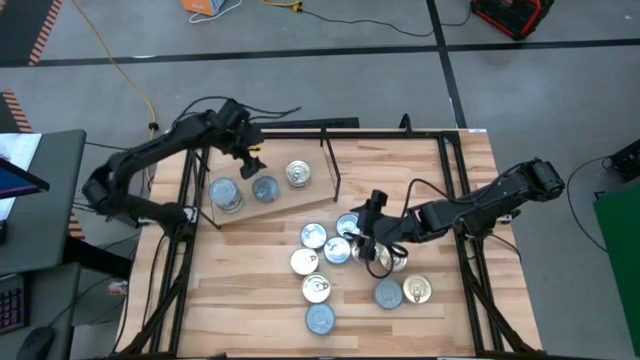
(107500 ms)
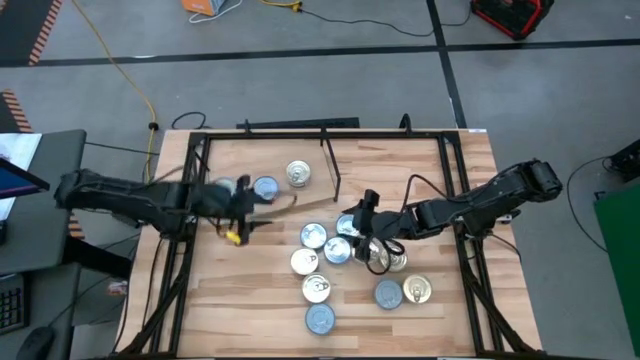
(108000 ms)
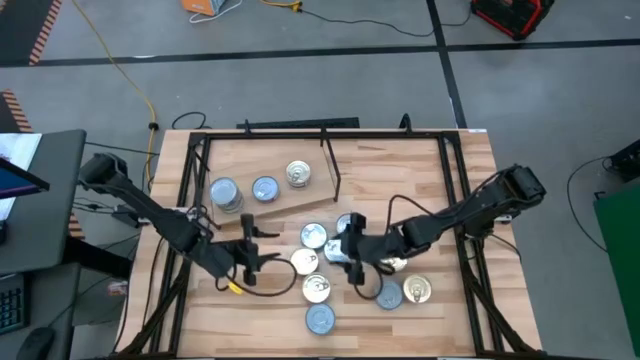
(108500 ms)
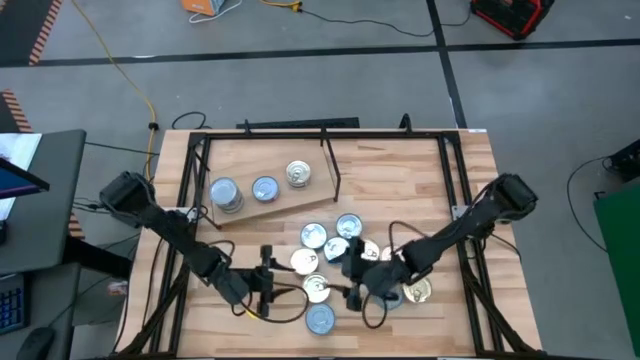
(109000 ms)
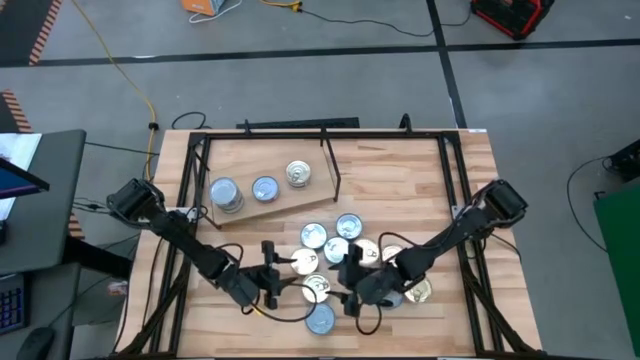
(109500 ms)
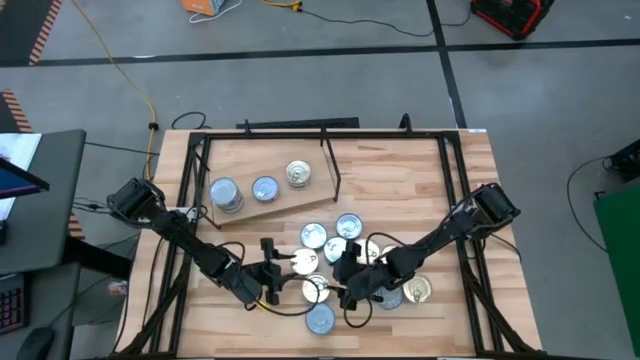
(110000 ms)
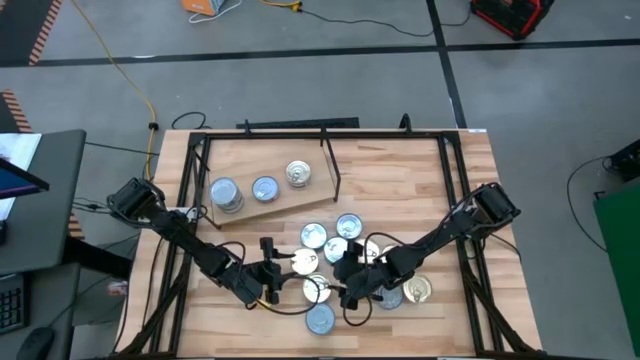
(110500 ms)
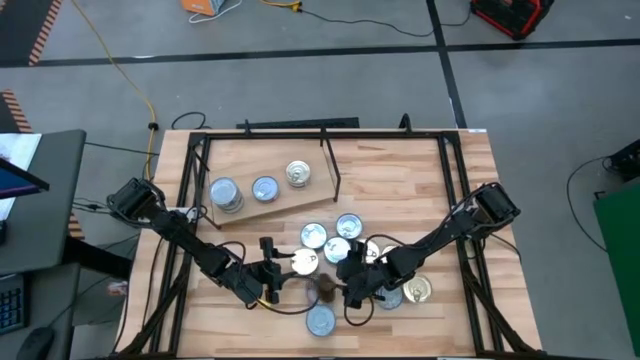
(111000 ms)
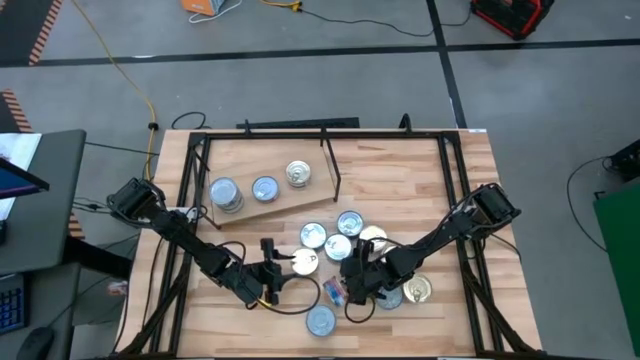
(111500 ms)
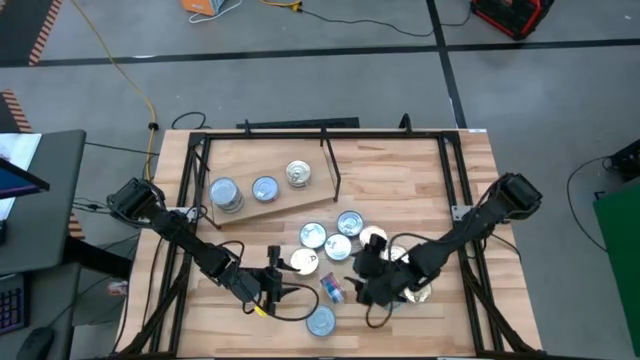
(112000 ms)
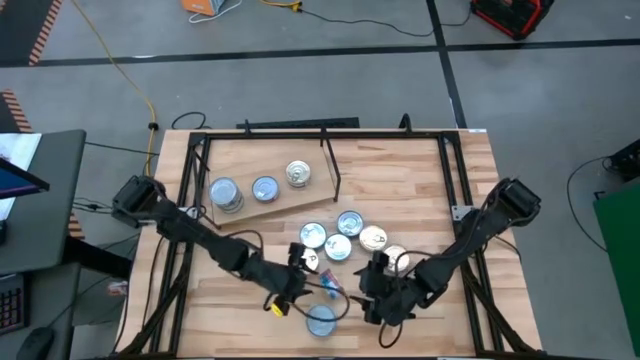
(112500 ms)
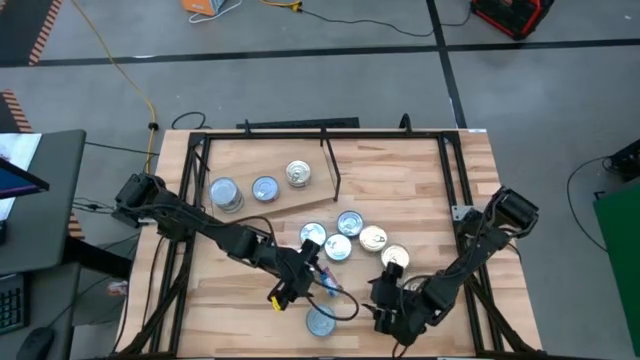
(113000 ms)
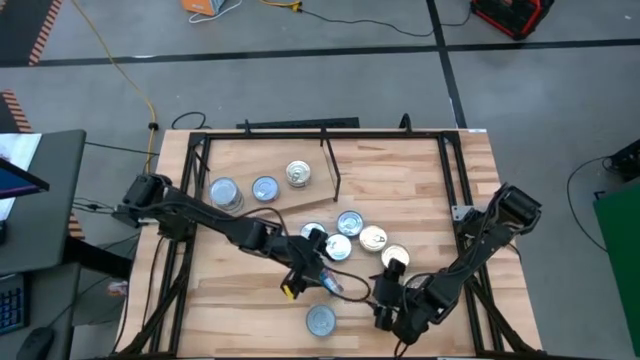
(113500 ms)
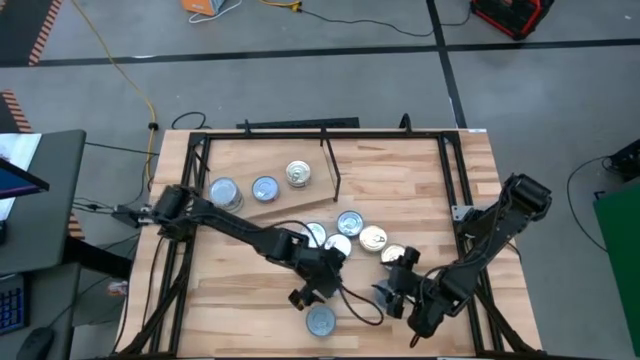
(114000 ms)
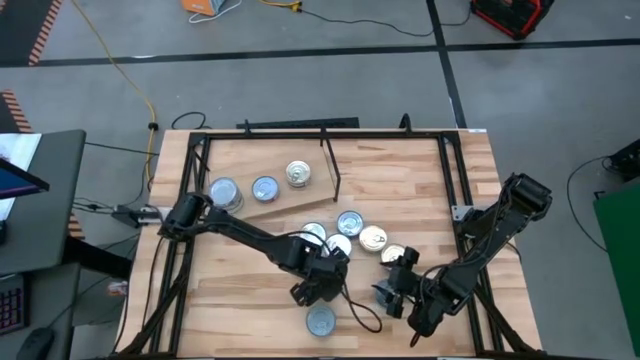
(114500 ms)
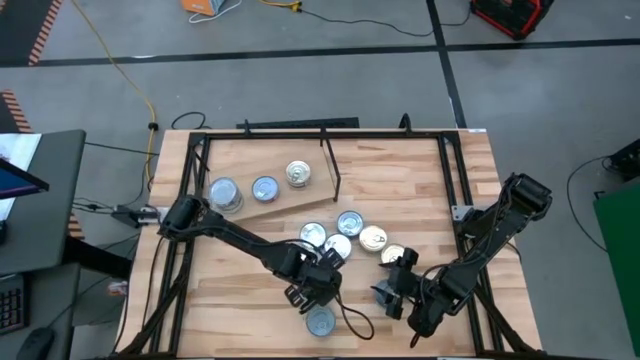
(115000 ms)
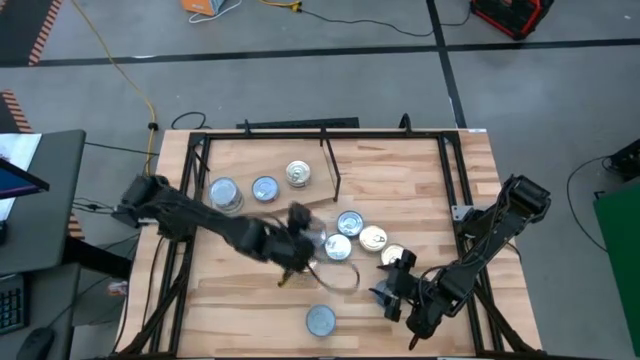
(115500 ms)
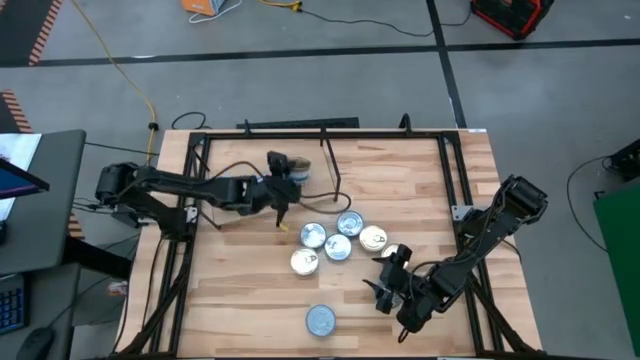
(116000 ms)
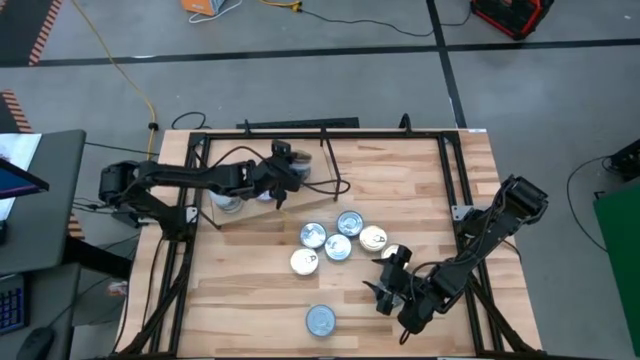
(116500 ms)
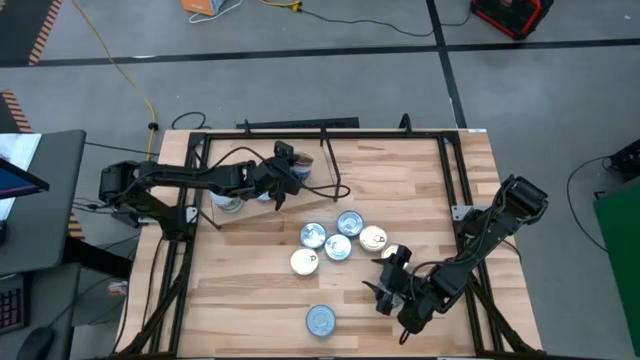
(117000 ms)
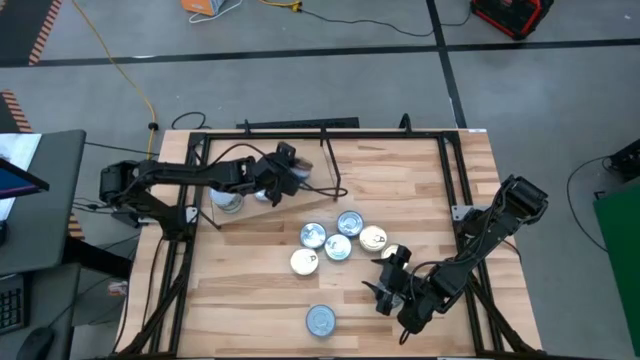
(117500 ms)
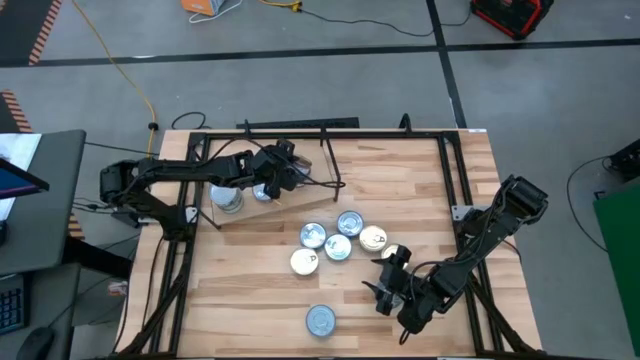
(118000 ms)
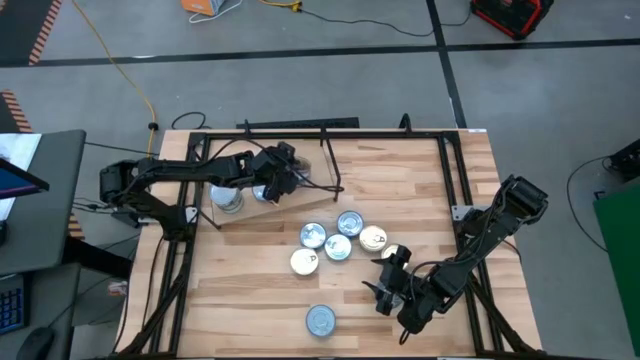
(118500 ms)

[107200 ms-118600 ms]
Task: Stack canned seafood by type on shelf
Stack the blue pink tuna can on top of the blue pink tuna can on the shelf

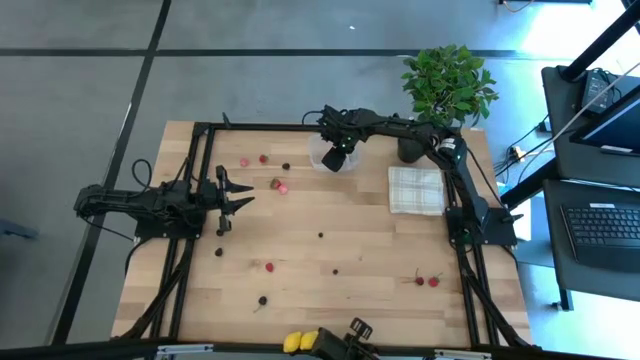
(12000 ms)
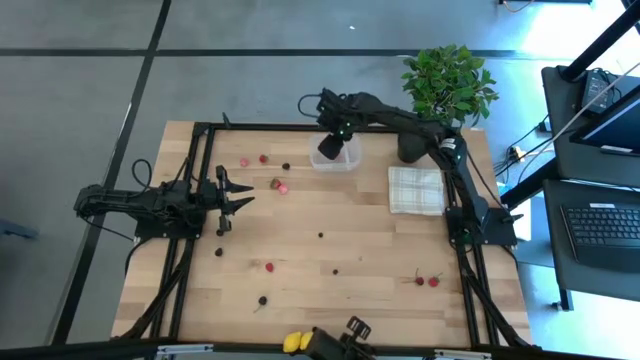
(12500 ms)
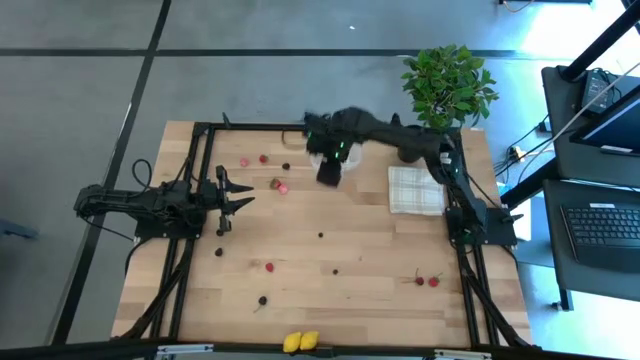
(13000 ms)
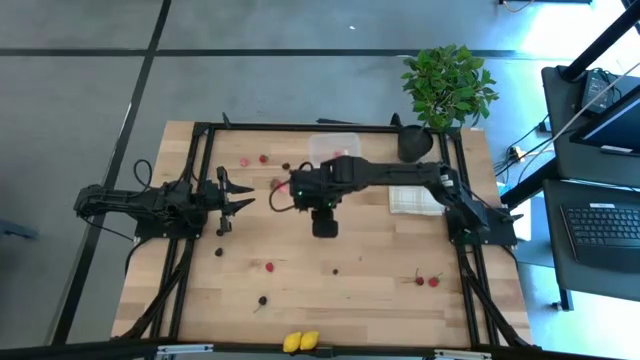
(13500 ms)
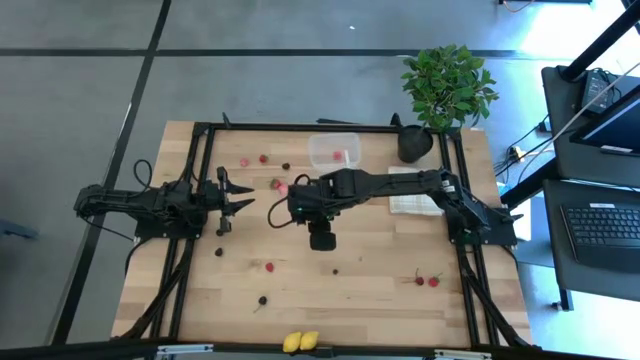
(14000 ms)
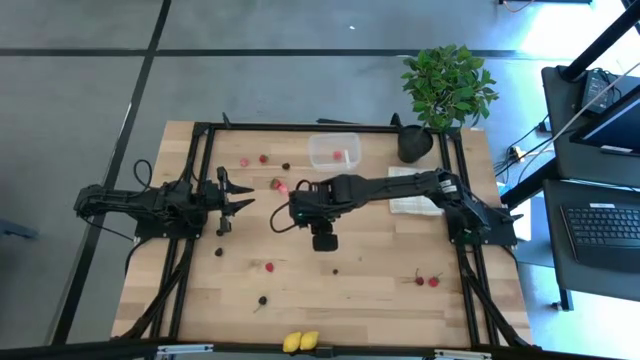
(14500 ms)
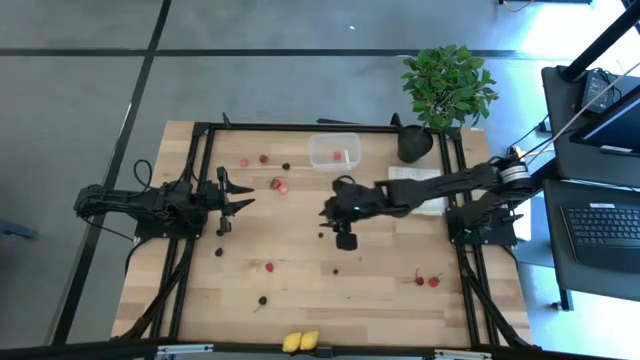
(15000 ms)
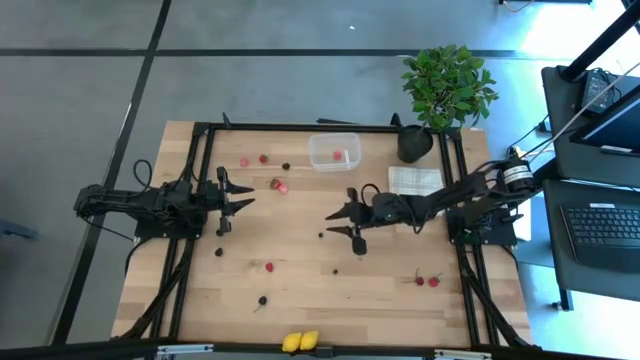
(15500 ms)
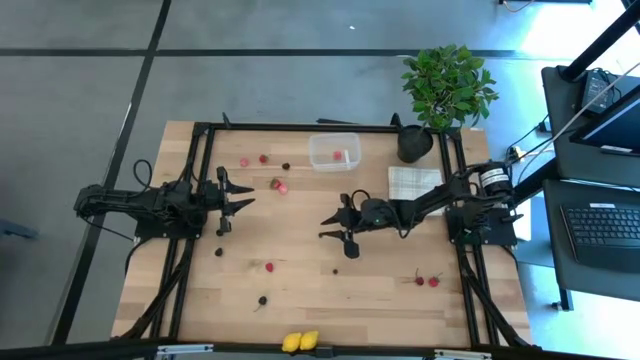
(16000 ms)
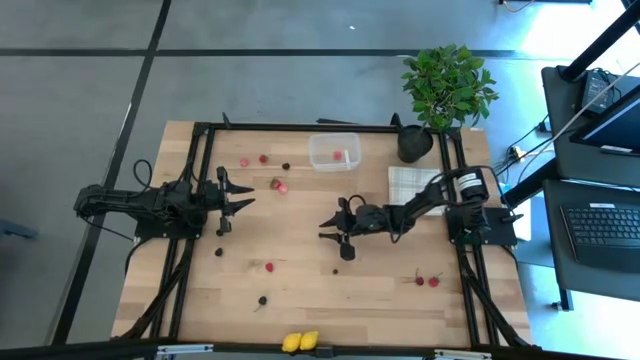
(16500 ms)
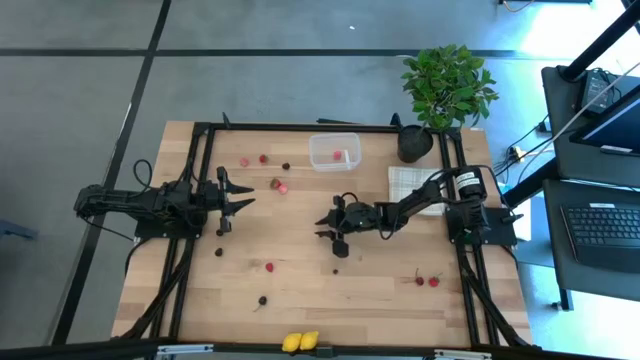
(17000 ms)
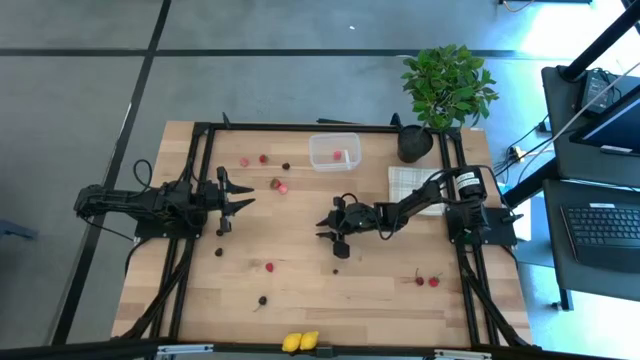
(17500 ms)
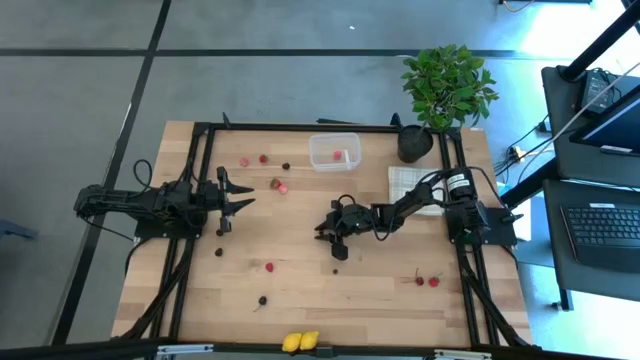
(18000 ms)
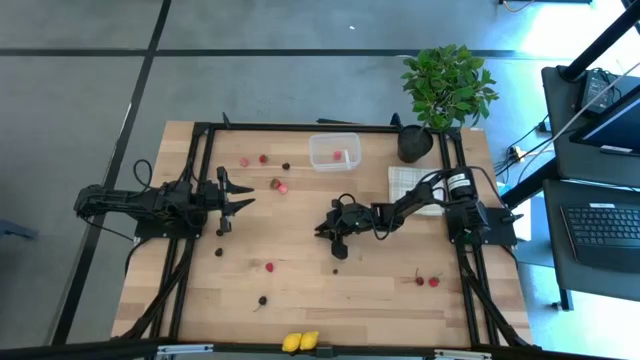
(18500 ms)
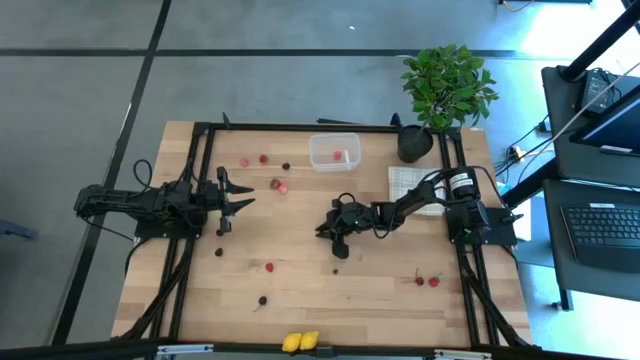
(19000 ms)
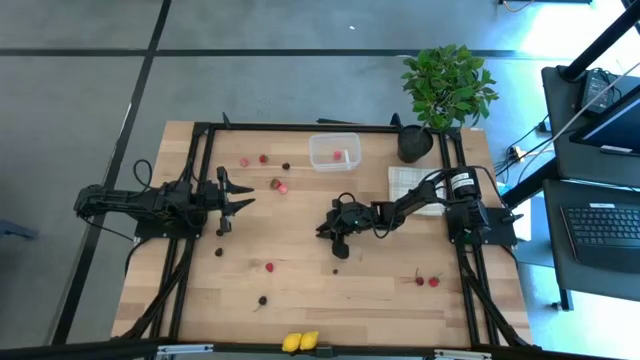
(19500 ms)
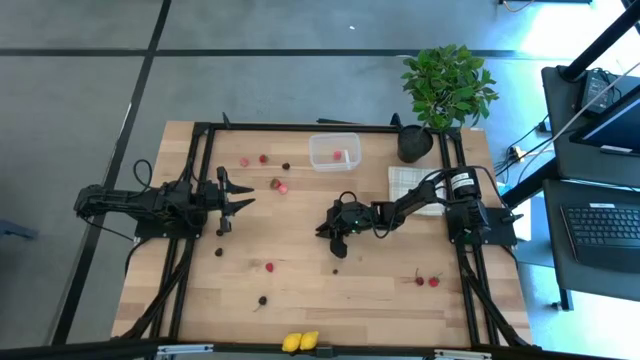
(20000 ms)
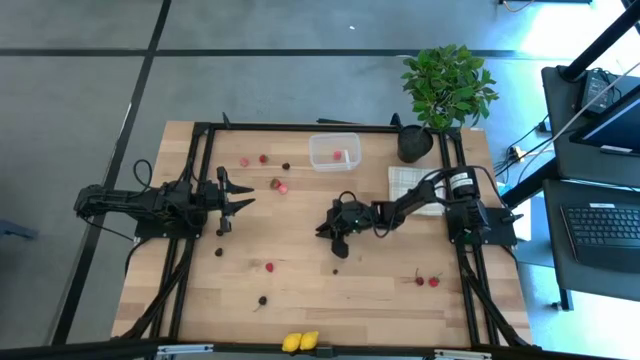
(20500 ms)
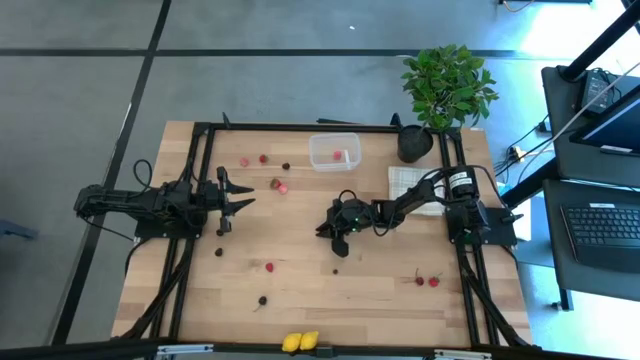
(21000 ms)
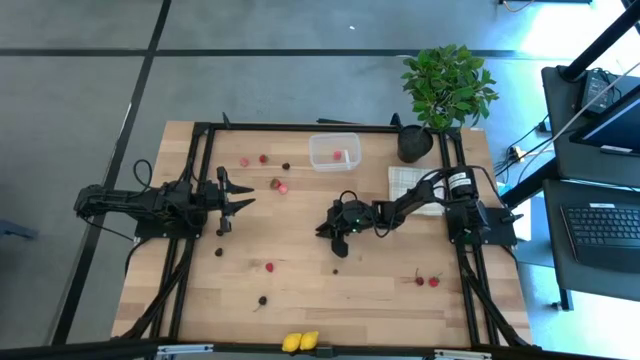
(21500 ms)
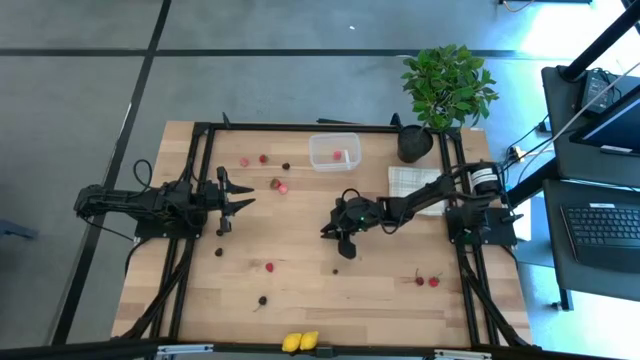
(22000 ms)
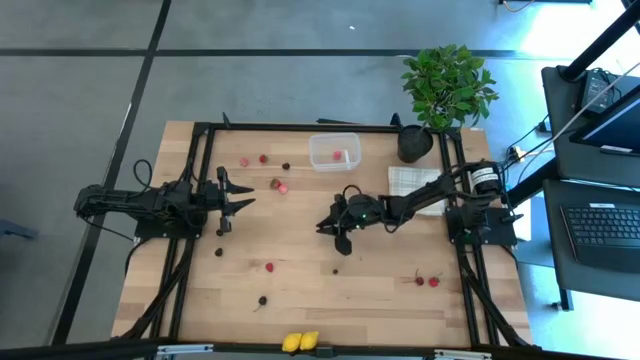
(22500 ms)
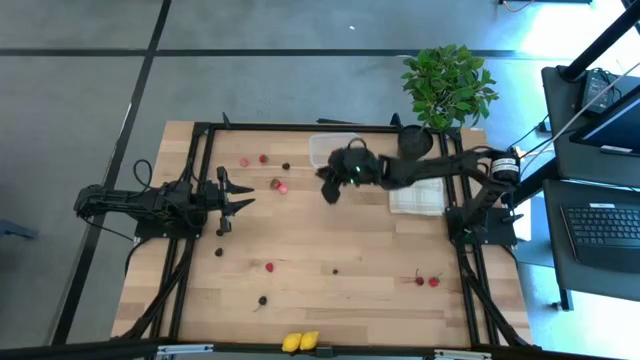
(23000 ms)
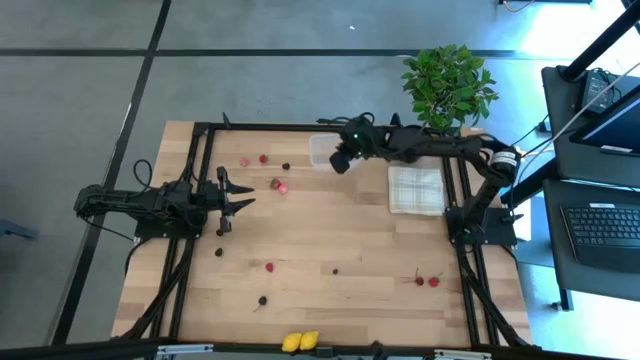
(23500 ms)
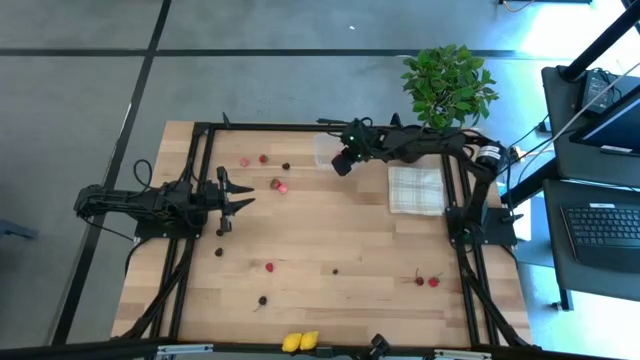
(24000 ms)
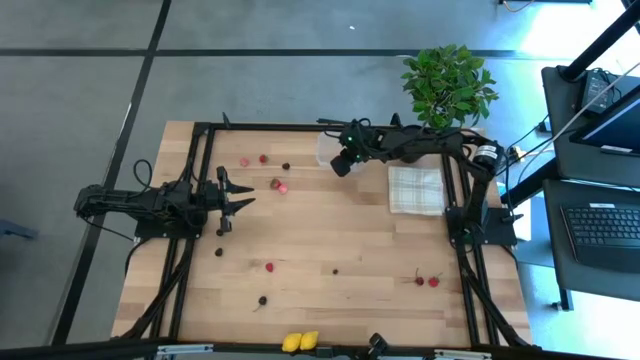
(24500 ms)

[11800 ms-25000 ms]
Task: Pick and placing Produce into tupperware
Put the top blueberry into the transparent container
